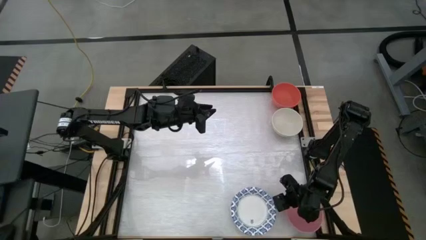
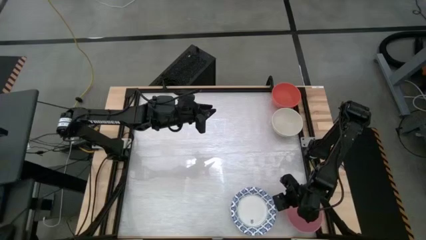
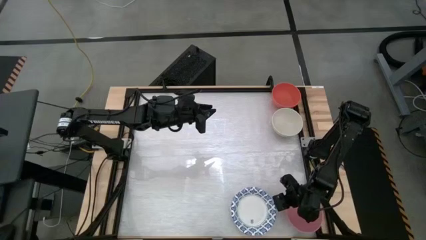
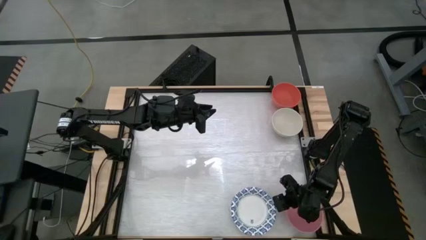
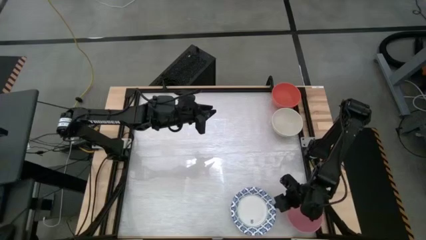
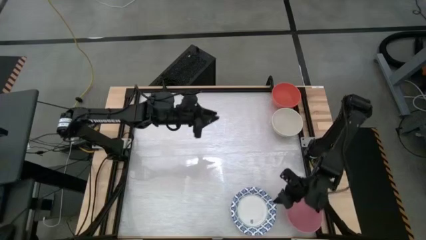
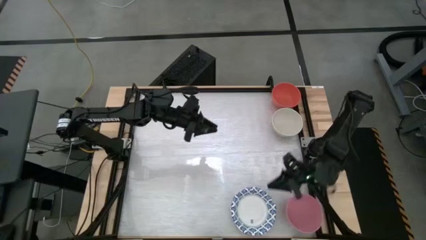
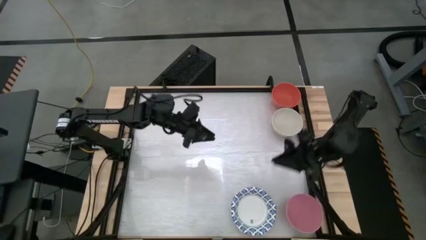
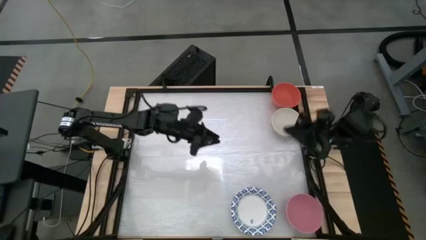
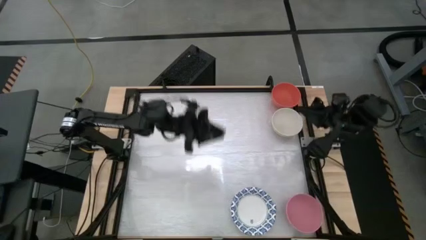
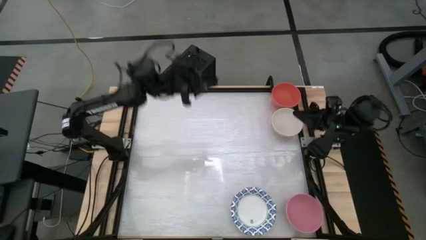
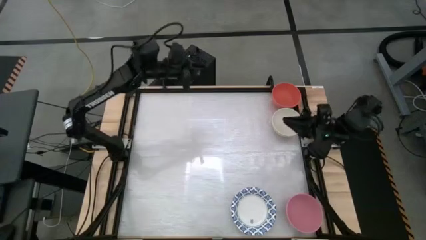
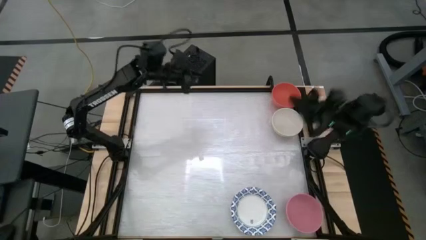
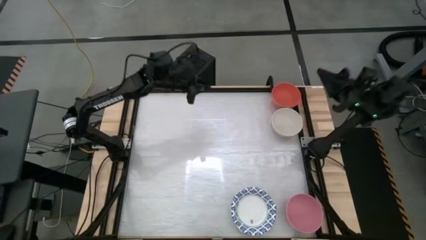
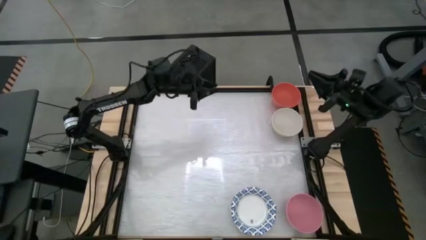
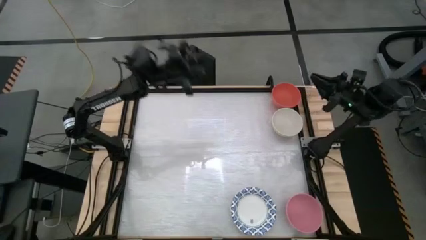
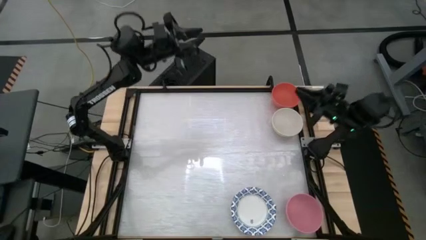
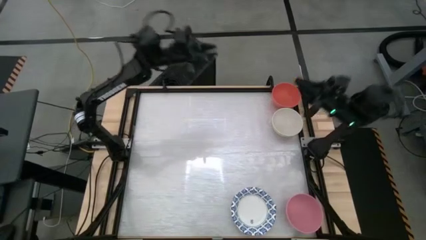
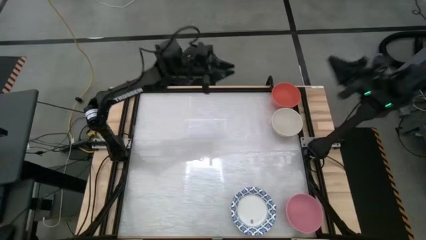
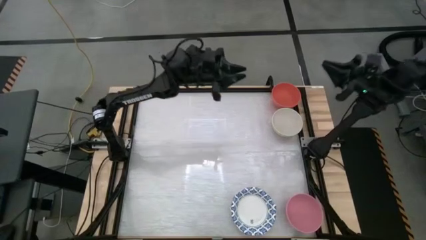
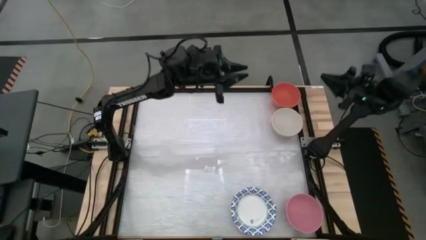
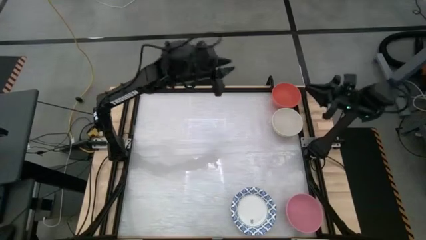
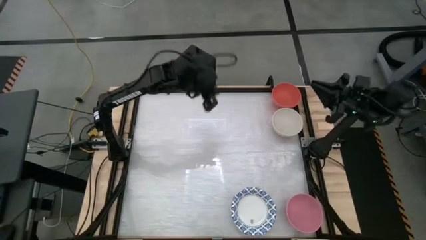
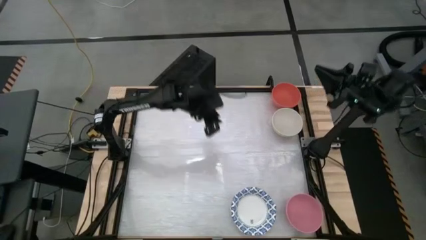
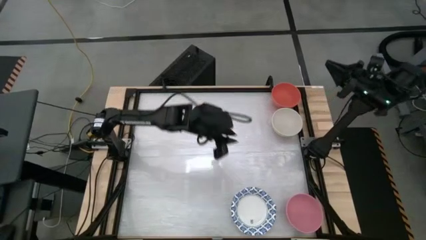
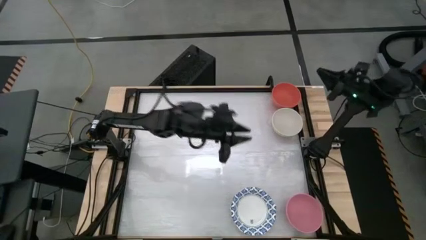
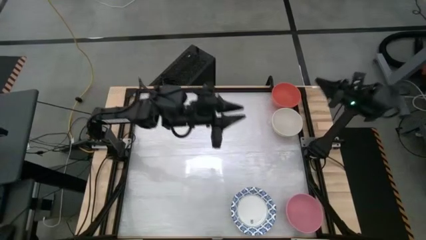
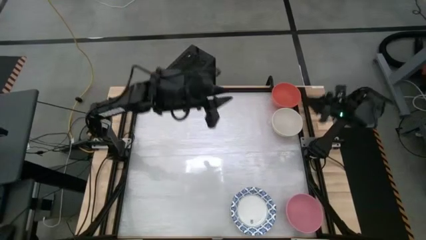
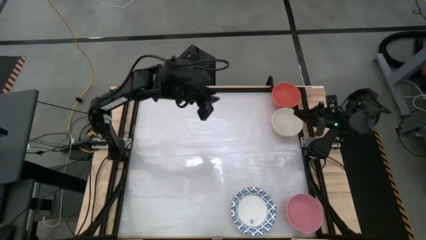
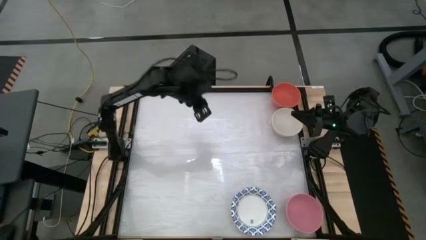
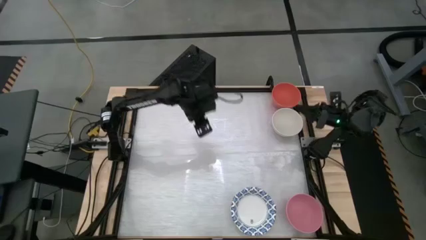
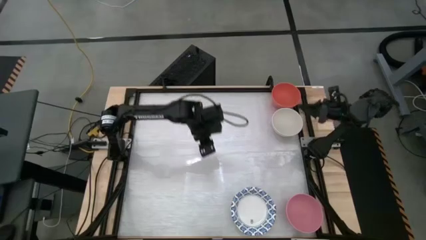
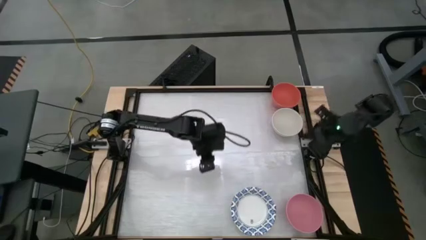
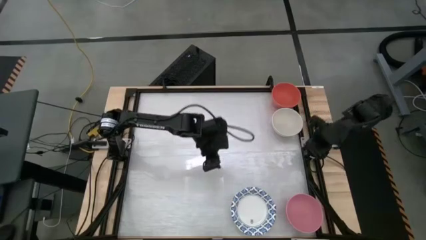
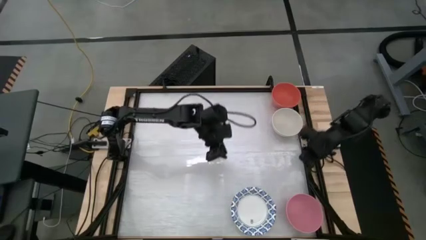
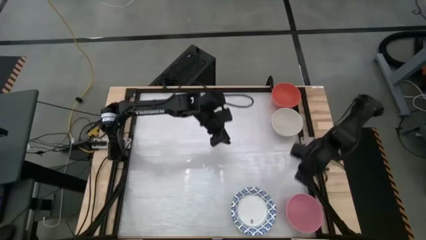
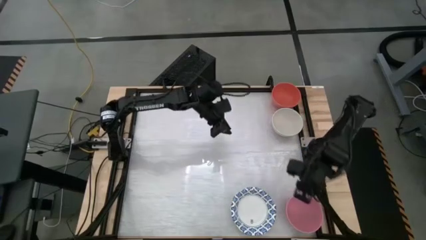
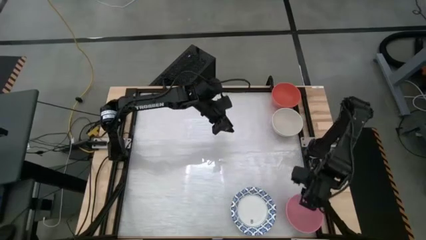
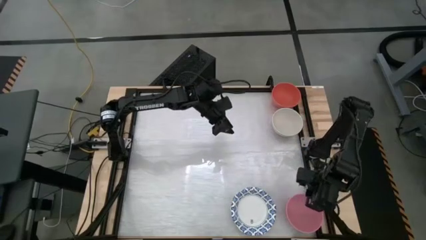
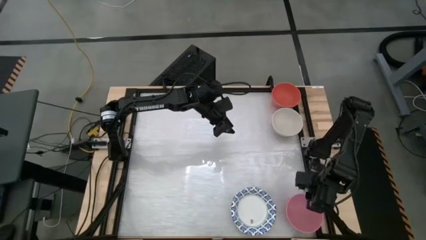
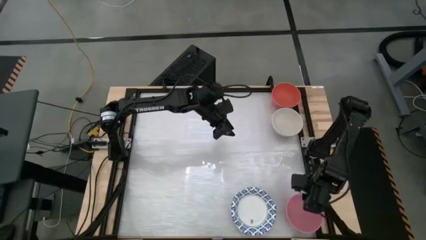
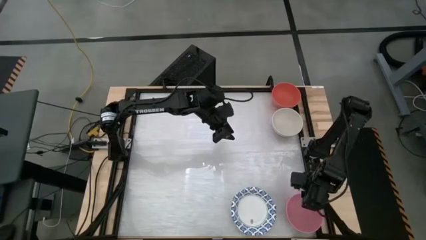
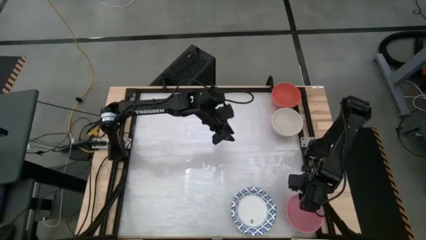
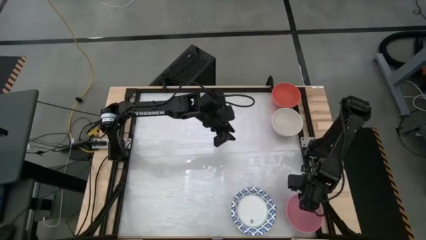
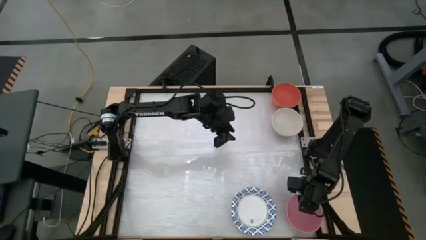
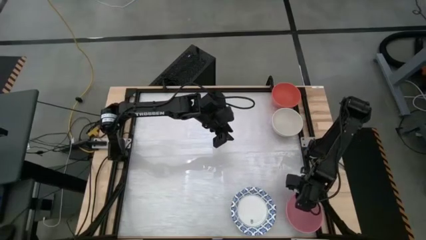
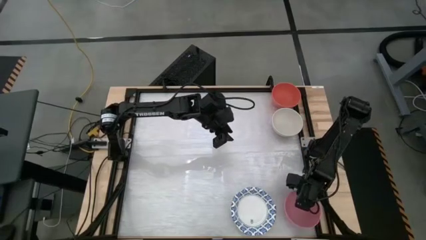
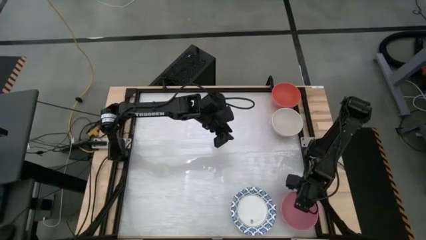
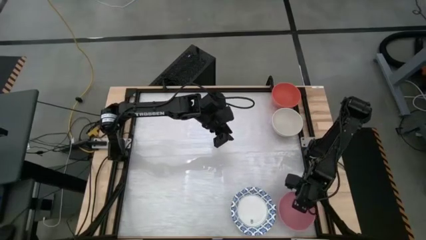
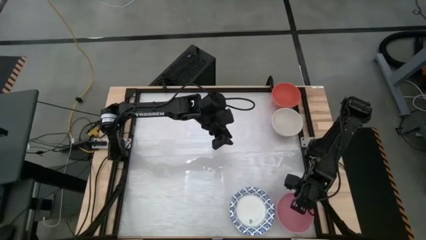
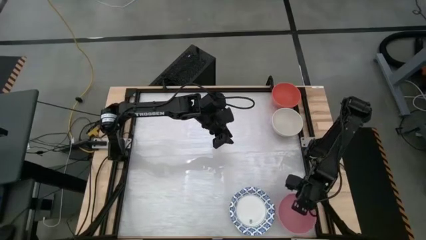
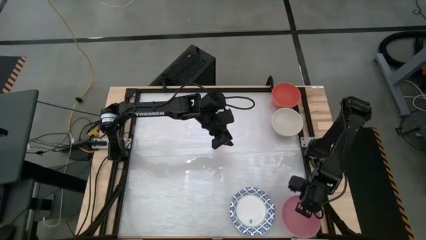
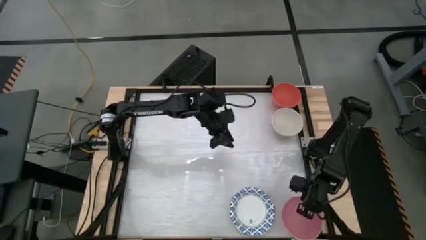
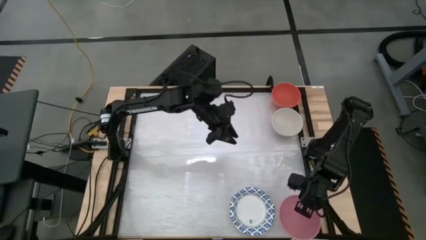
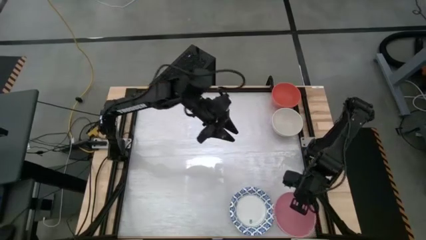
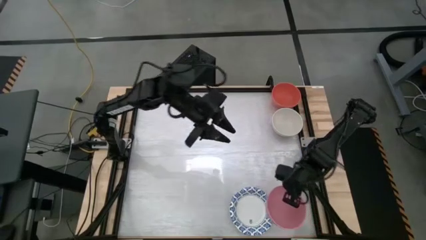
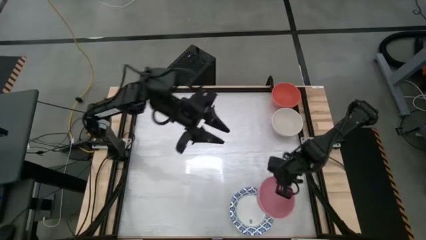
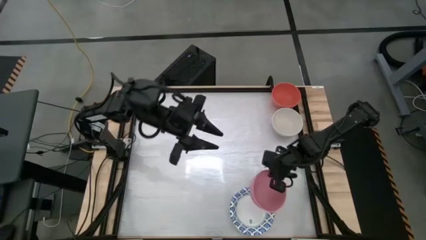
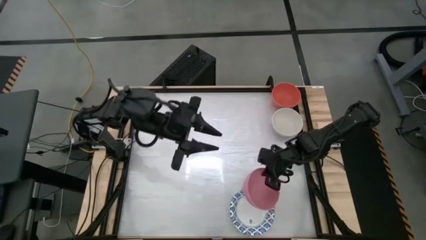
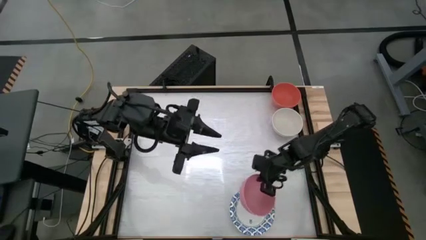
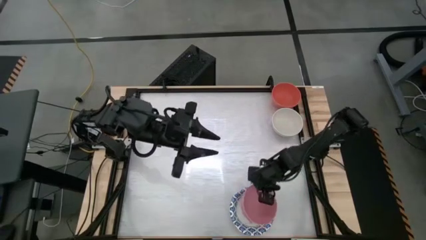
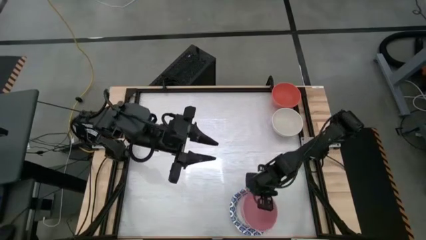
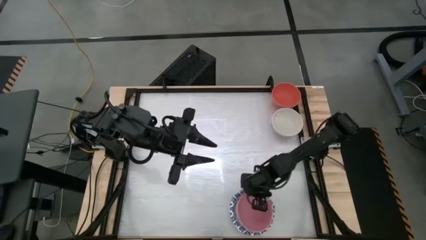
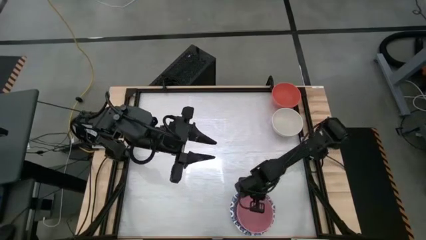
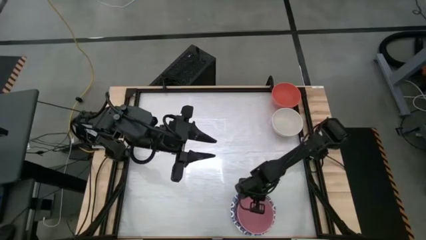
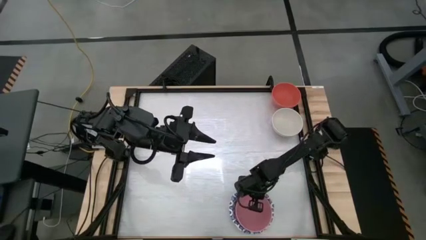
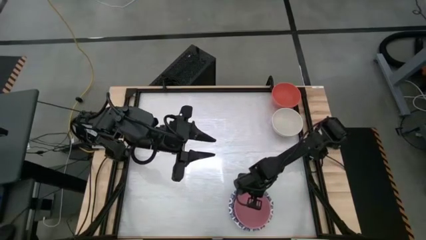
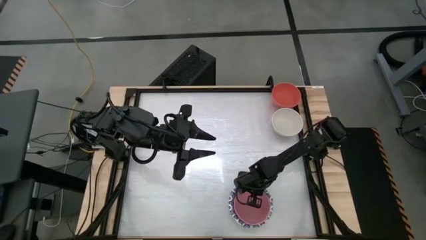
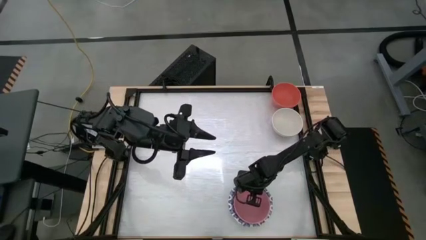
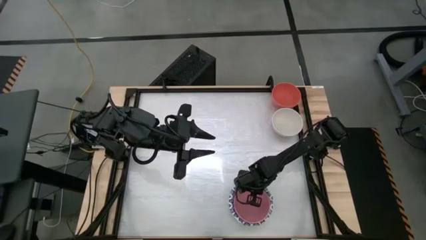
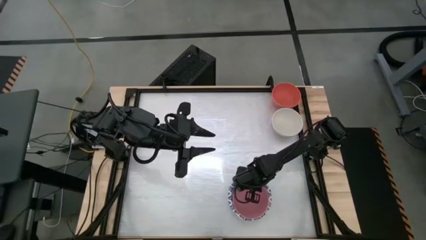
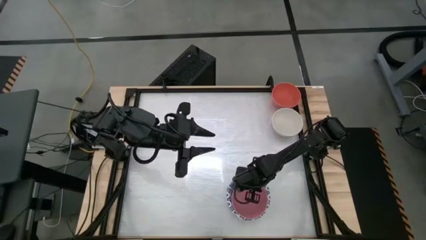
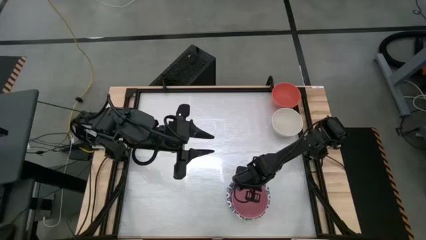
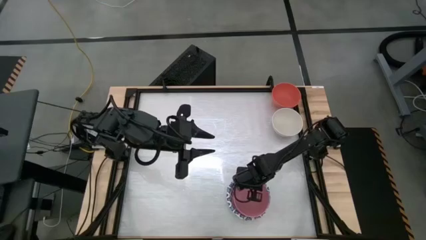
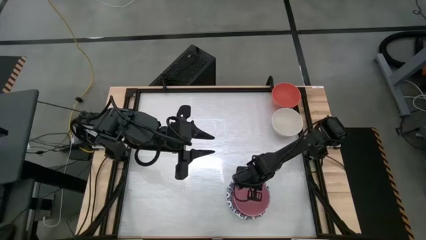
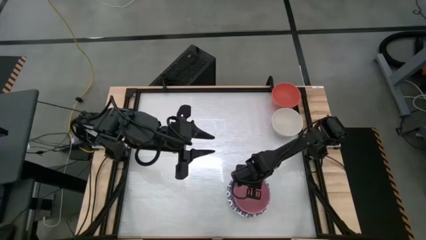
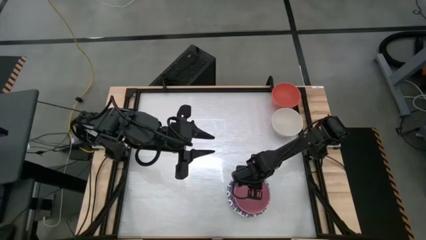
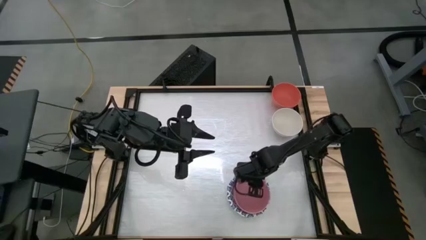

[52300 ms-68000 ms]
Stack the pink bowl on top of the white blue patterned bowls
